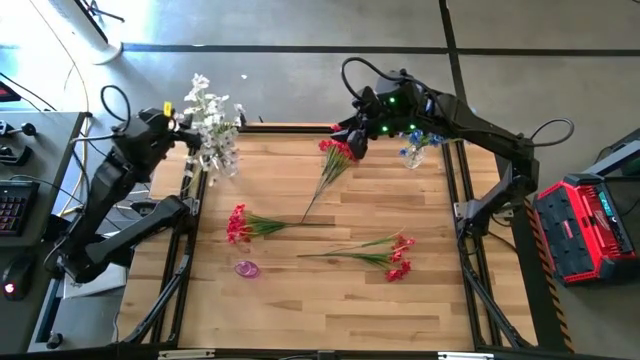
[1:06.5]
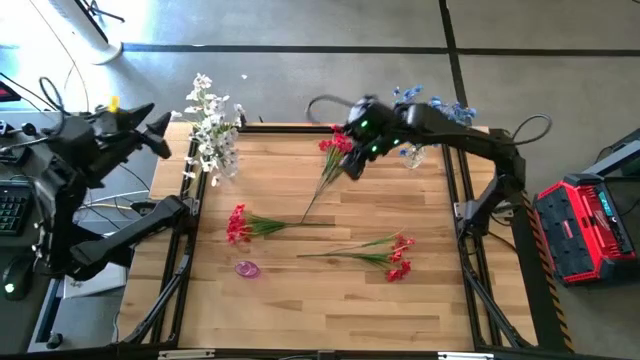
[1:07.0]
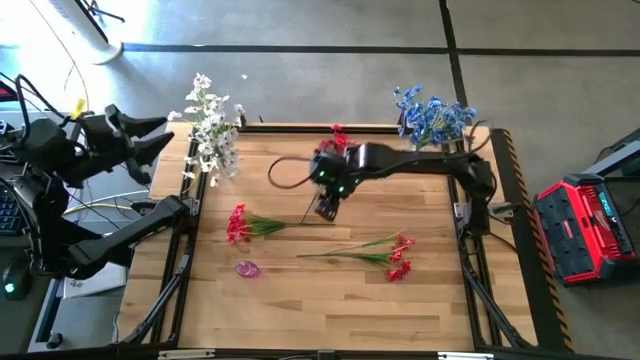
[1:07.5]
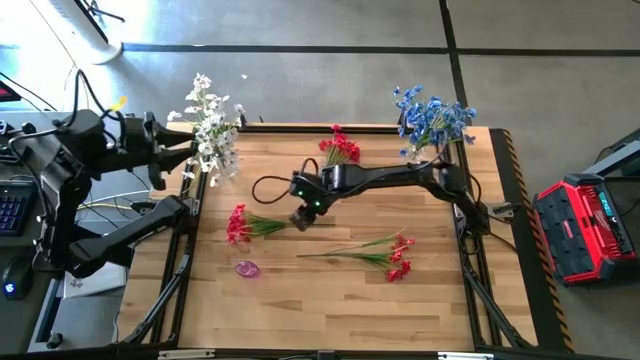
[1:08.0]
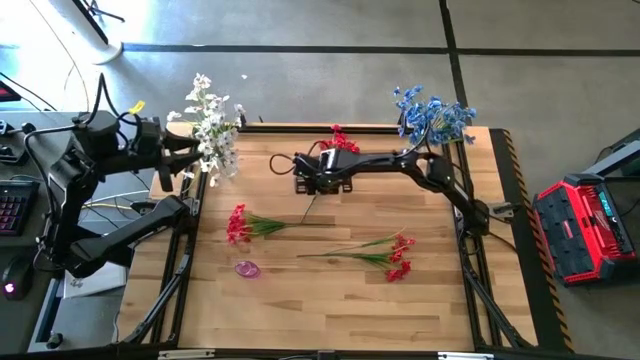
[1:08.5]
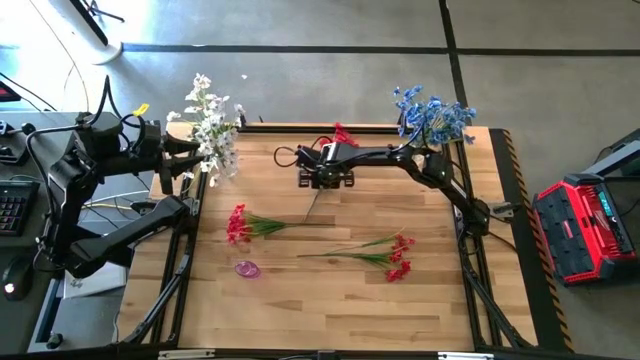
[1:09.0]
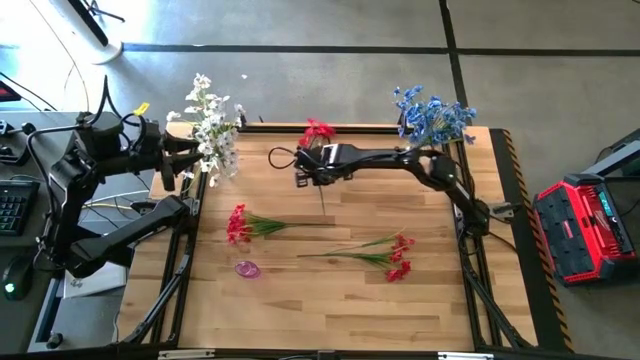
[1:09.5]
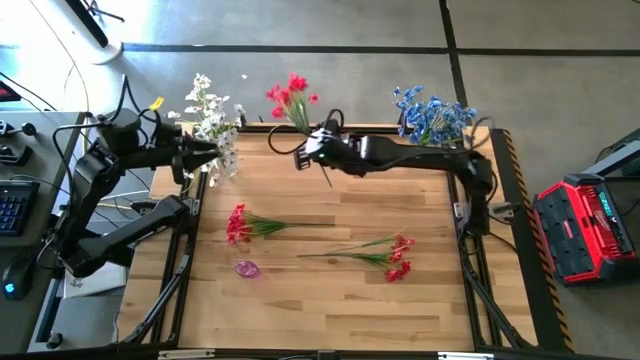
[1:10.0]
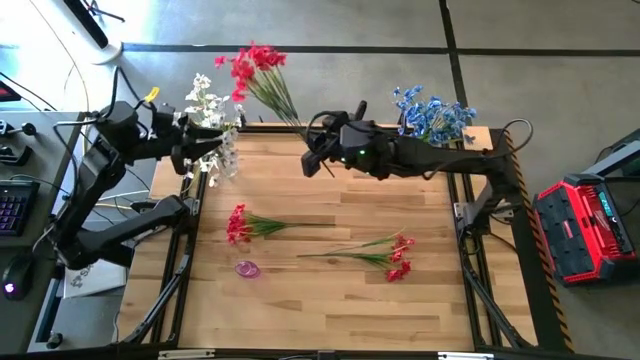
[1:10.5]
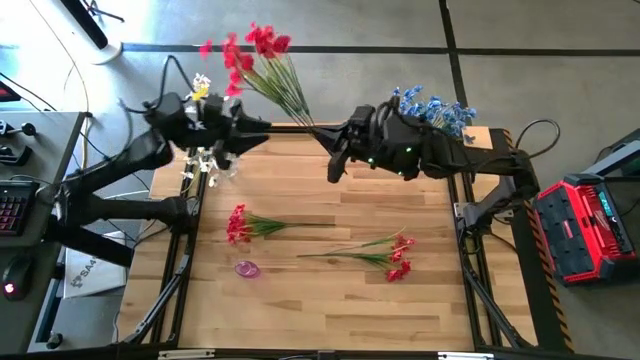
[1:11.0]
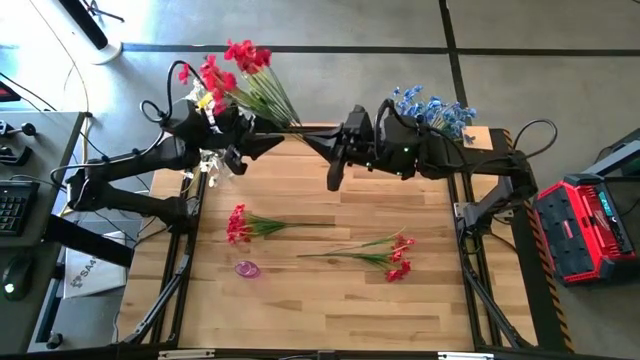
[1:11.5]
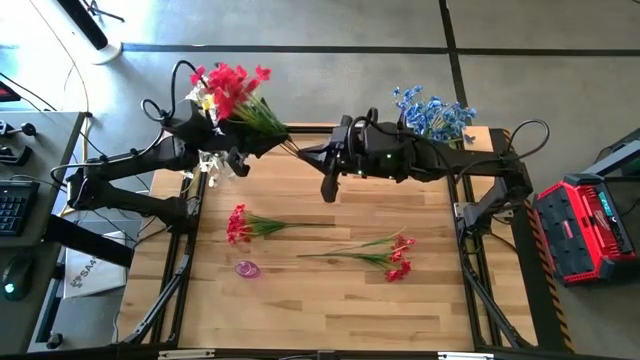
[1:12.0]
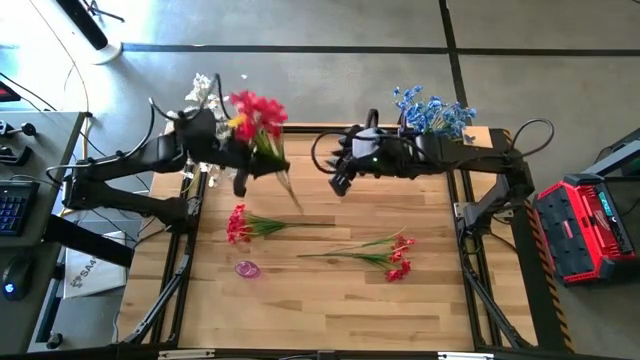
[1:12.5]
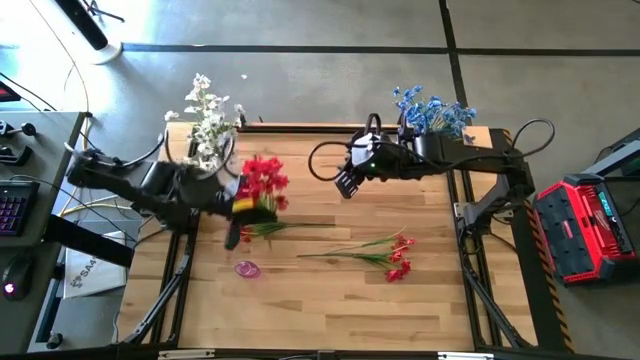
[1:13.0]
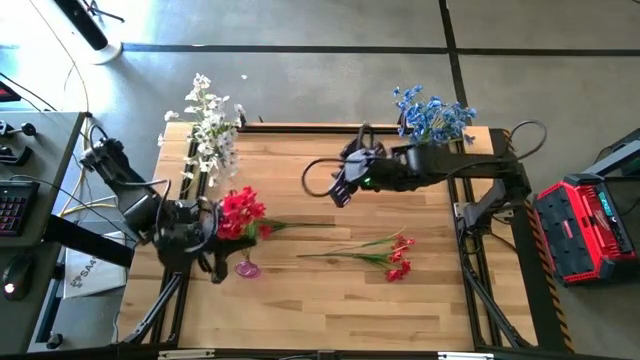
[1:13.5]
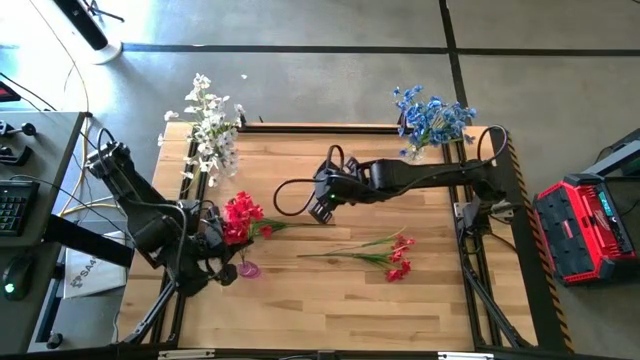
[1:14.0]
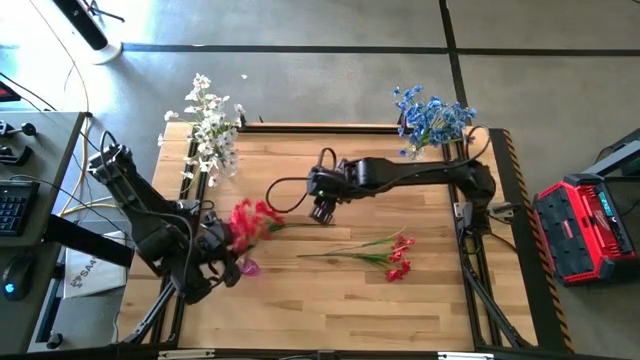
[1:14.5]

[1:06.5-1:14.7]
Task: Sort flowers into vase by color
Put the top red flowers into the purple vase

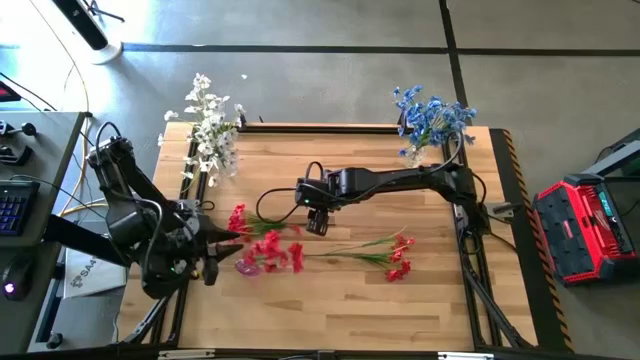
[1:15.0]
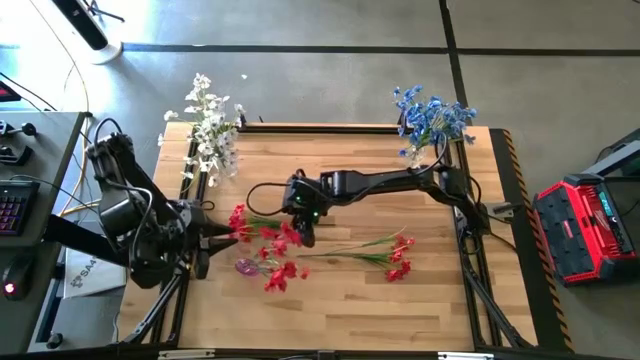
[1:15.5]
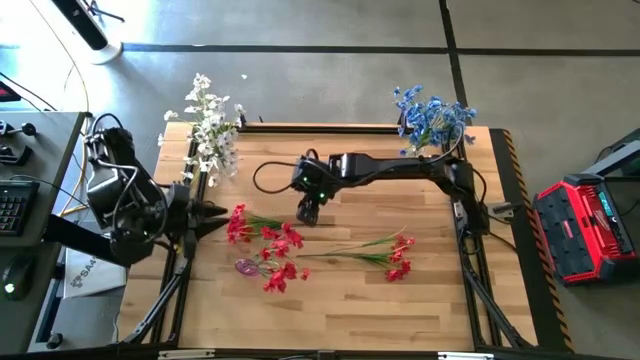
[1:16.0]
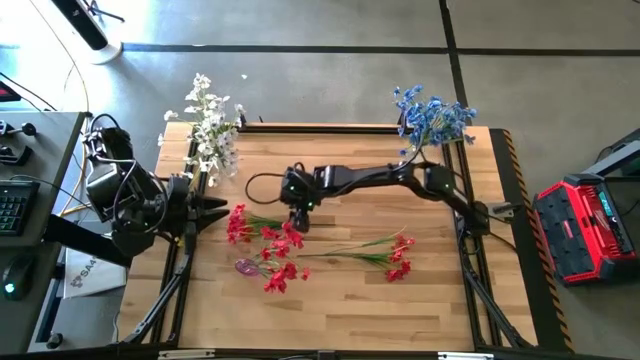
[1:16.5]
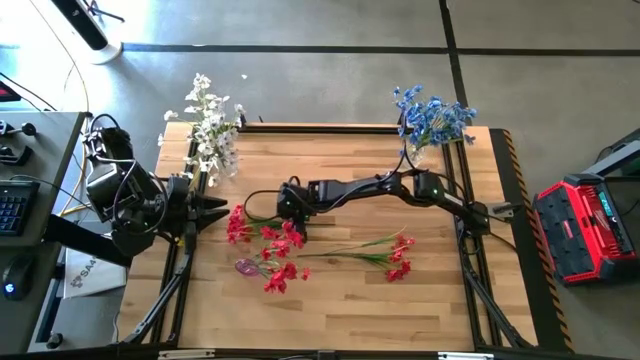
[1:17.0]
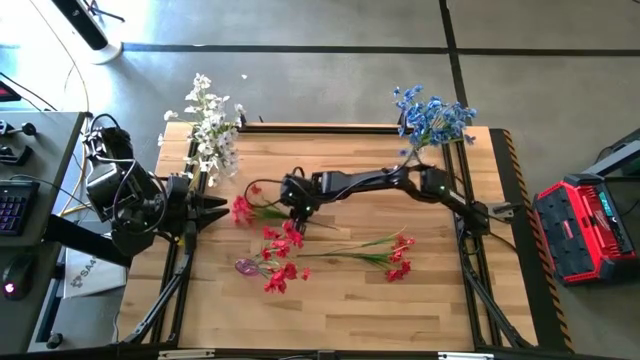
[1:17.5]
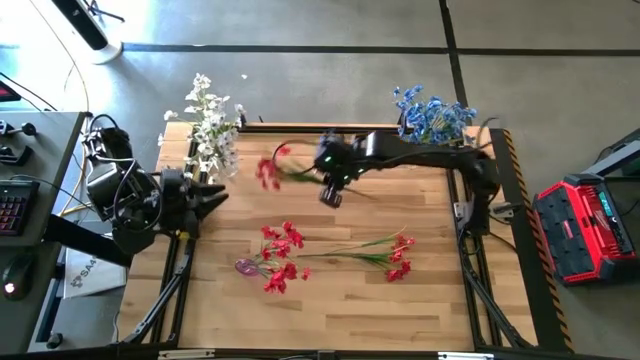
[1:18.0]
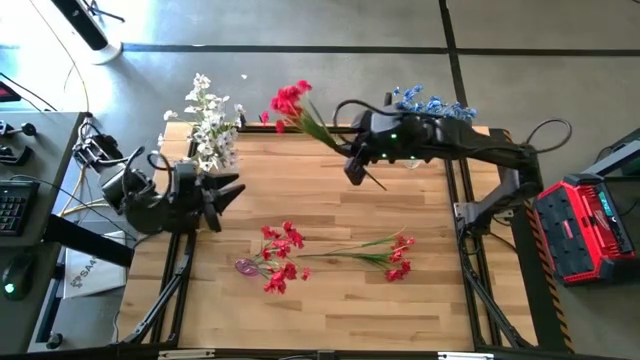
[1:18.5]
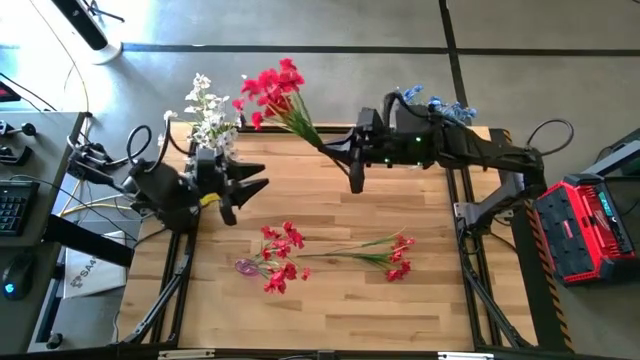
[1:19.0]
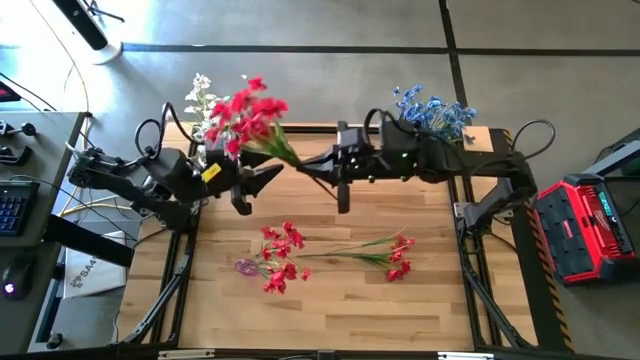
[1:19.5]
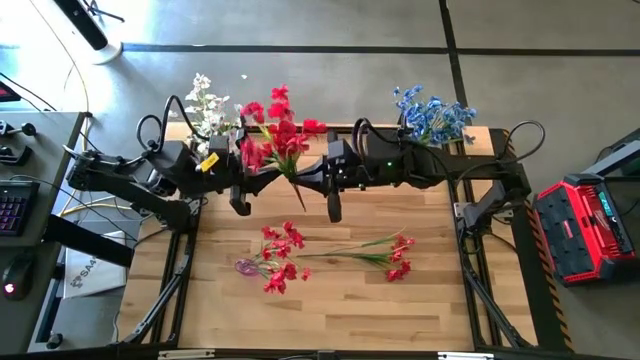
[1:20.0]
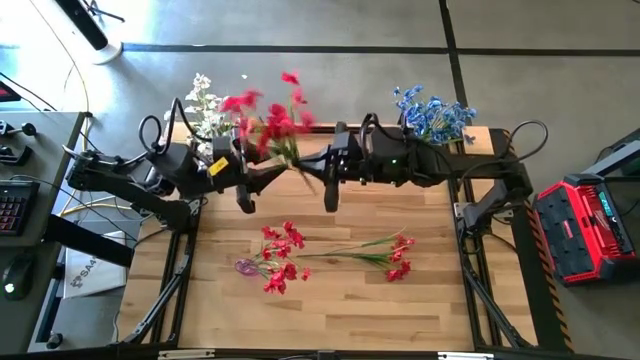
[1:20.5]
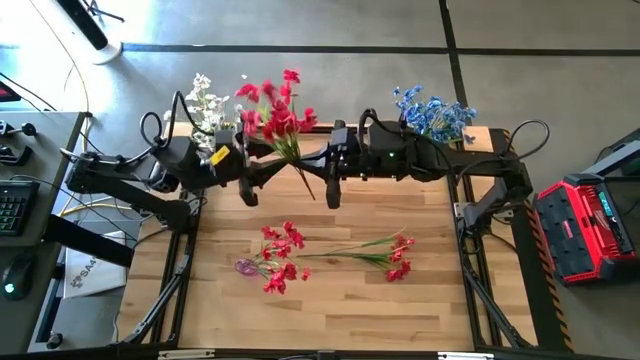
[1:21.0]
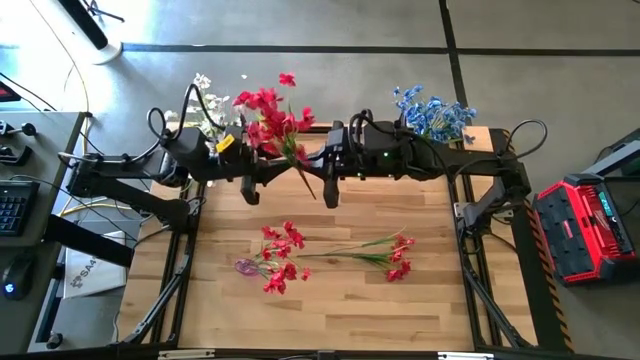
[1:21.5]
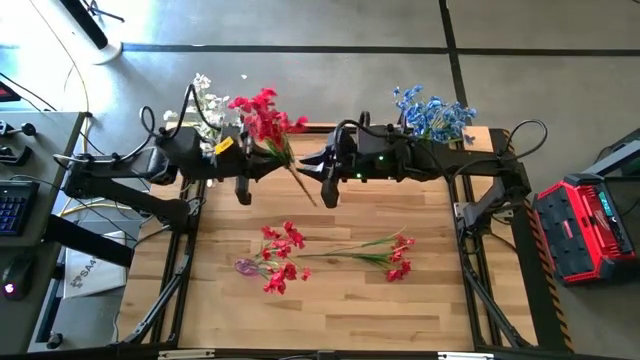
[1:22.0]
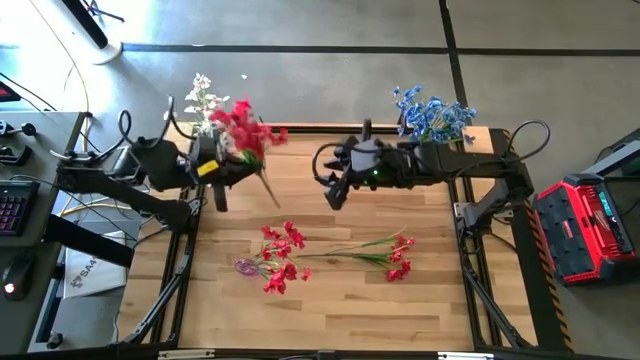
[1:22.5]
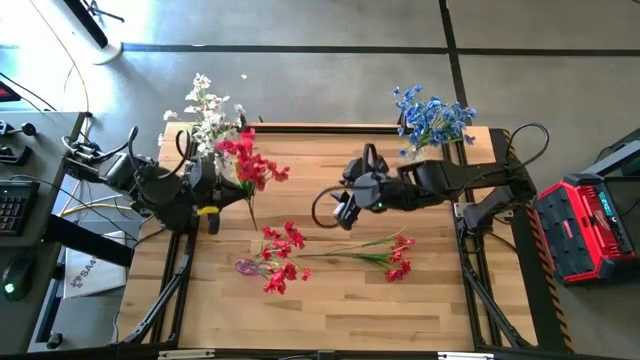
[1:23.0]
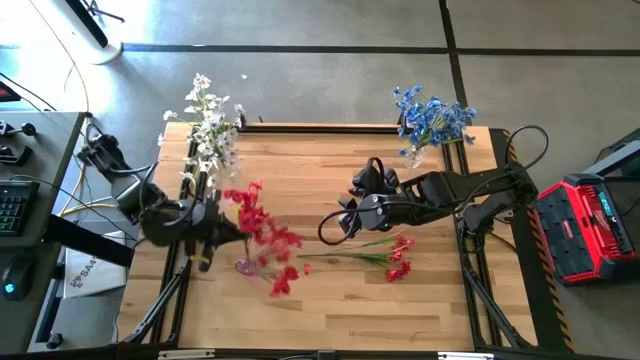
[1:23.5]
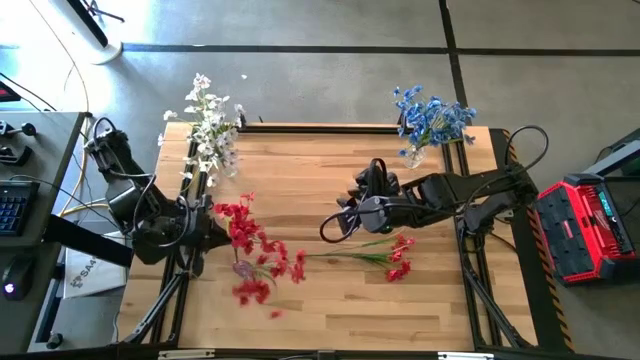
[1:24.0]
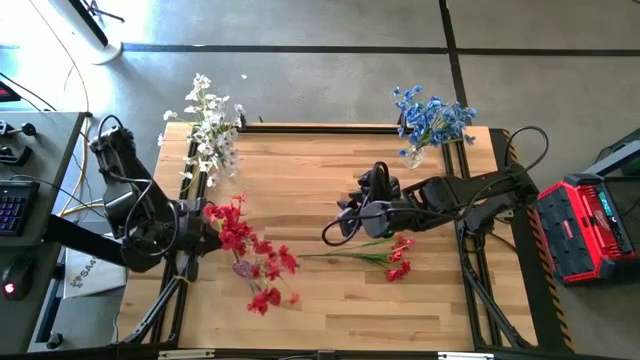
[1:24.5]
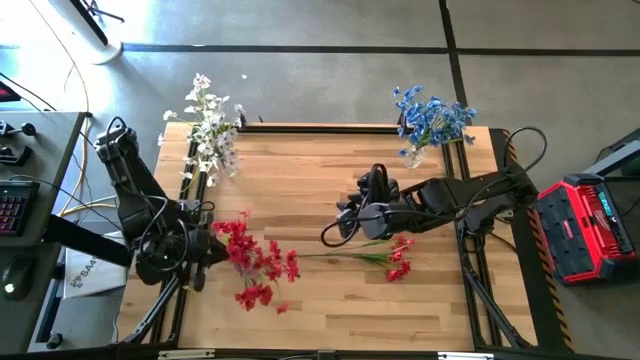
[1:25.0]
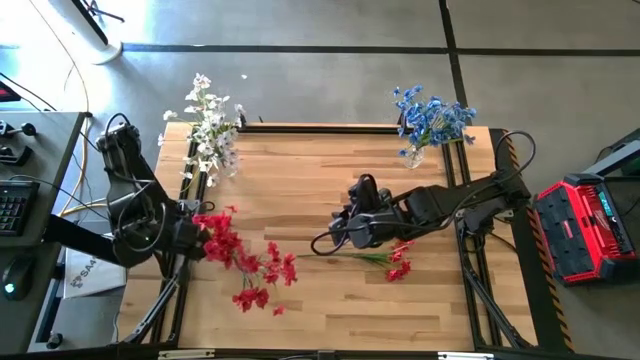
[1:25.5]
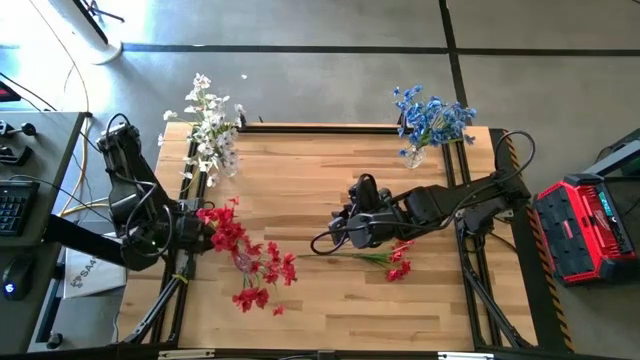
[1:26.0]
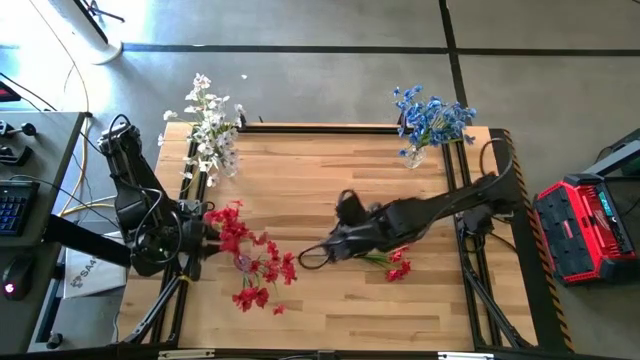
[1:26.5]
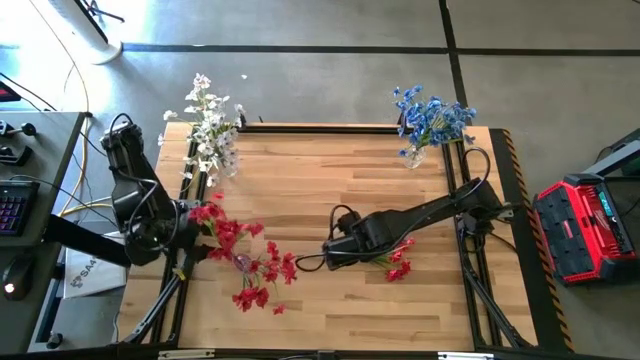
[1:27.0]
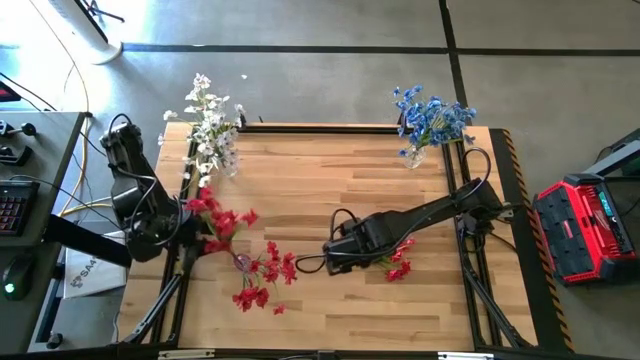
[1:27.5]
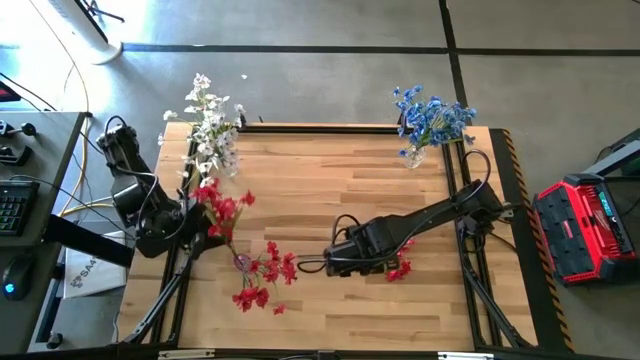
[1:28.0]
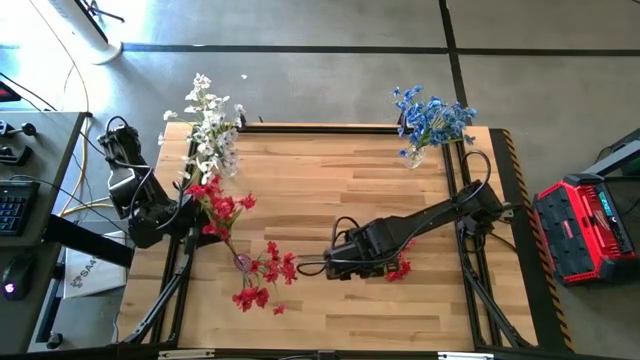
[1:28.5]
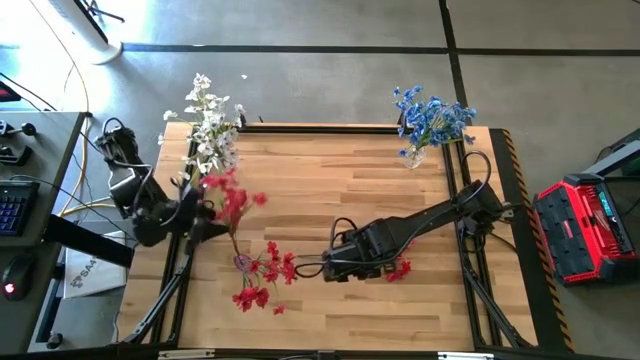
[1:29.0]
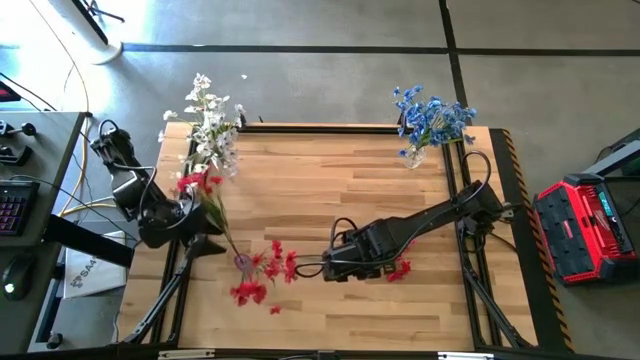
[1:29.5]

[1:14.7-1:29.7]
Put the left red flowers into the purple vase
